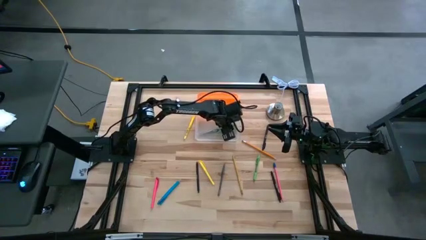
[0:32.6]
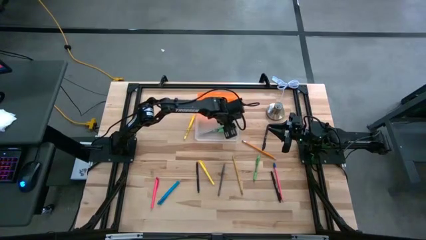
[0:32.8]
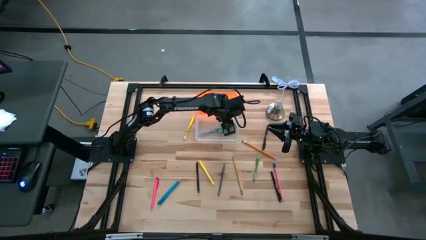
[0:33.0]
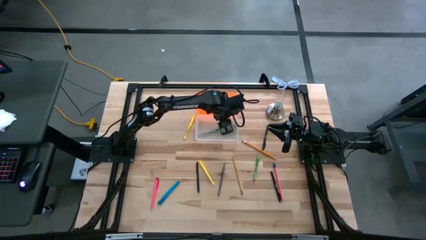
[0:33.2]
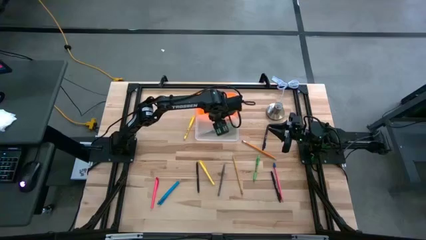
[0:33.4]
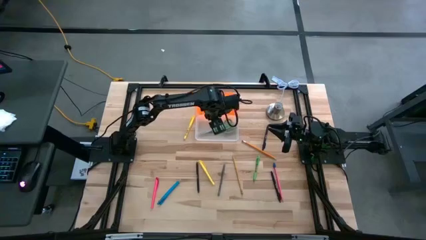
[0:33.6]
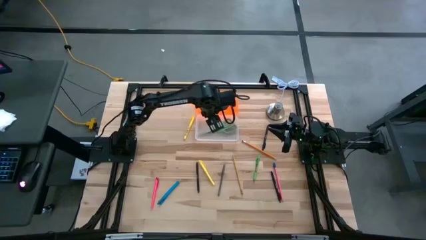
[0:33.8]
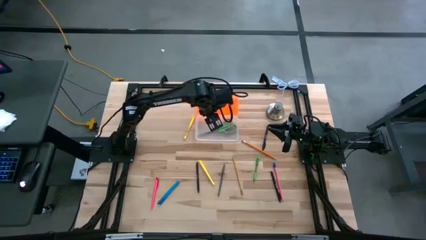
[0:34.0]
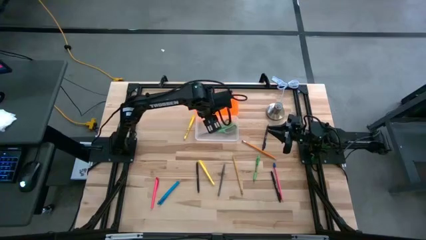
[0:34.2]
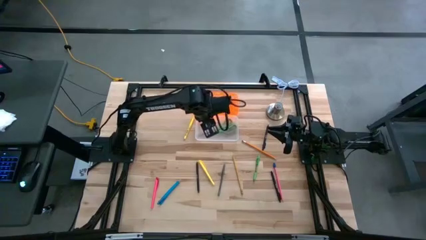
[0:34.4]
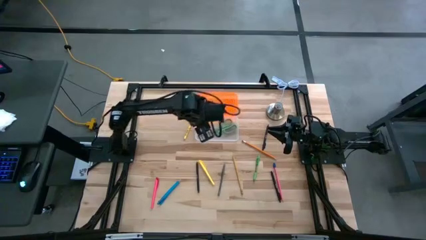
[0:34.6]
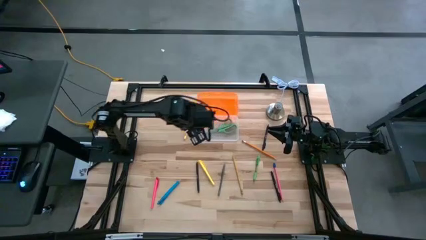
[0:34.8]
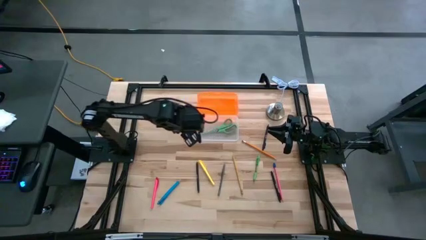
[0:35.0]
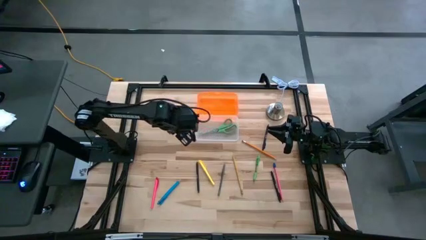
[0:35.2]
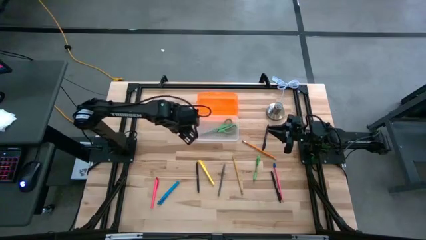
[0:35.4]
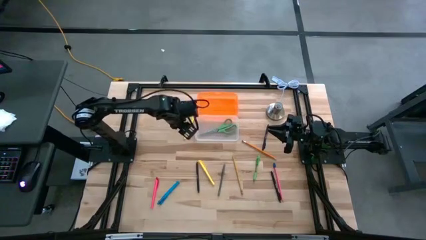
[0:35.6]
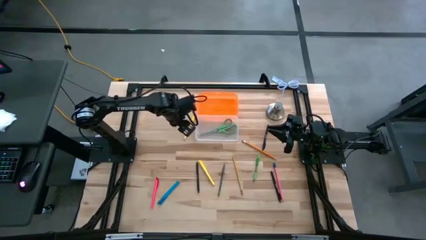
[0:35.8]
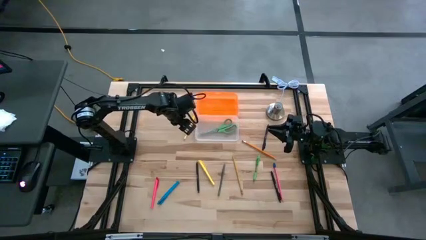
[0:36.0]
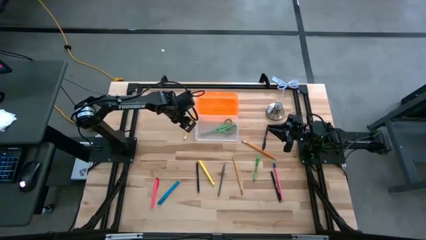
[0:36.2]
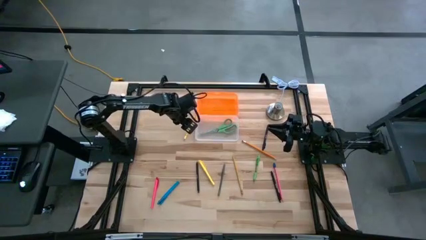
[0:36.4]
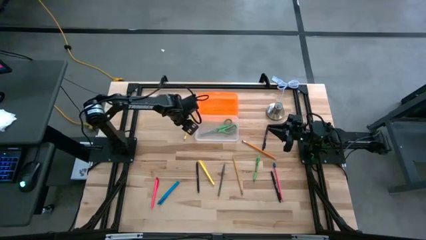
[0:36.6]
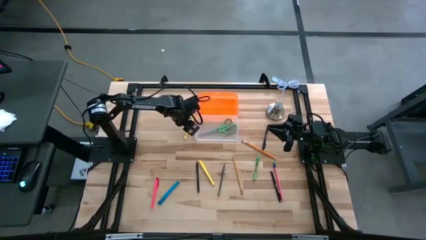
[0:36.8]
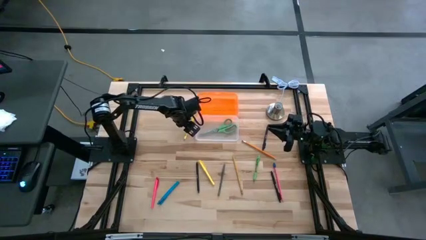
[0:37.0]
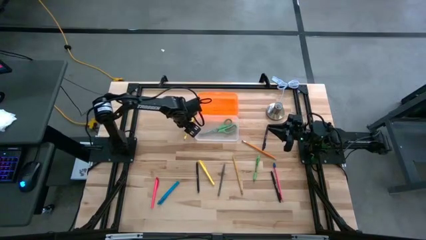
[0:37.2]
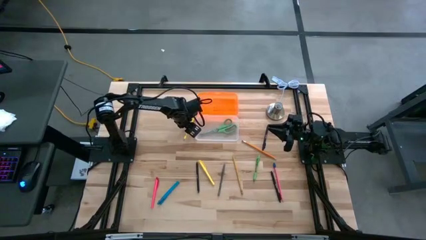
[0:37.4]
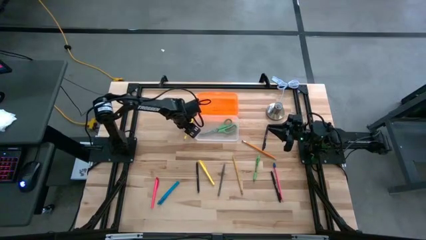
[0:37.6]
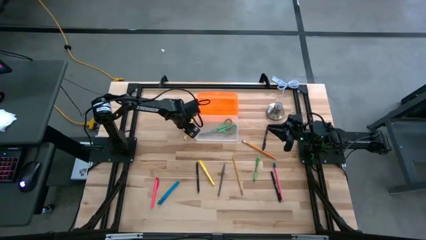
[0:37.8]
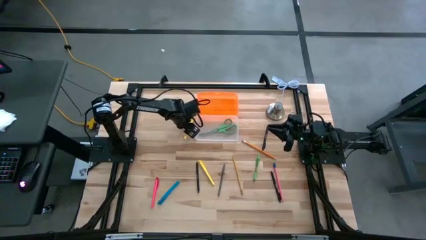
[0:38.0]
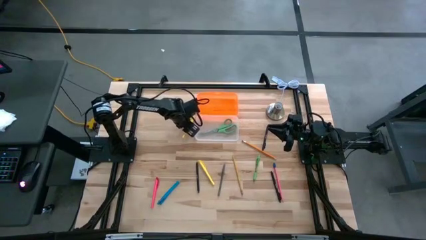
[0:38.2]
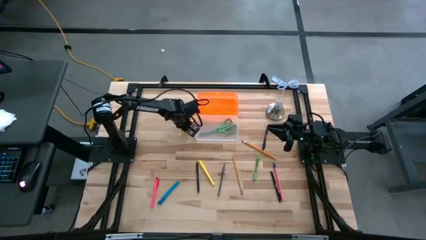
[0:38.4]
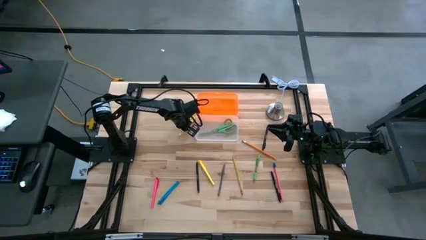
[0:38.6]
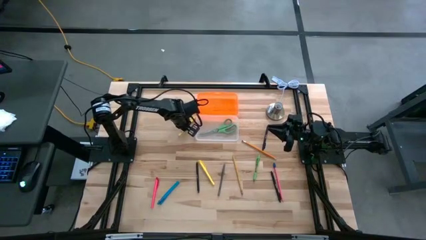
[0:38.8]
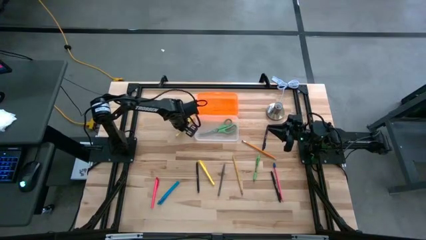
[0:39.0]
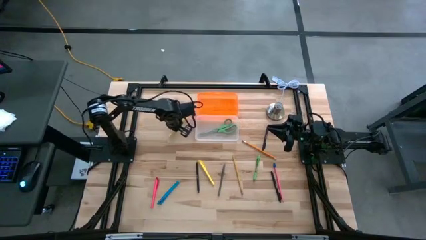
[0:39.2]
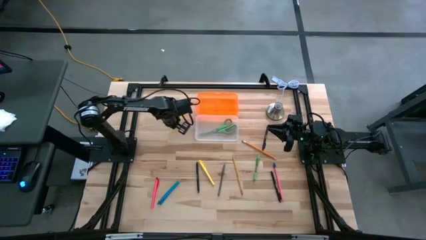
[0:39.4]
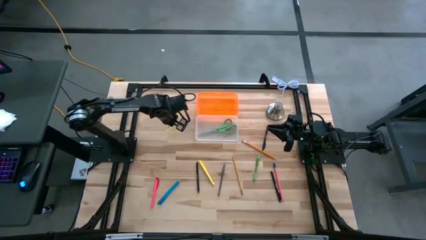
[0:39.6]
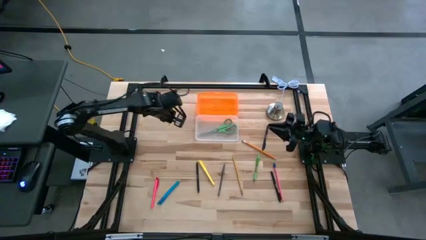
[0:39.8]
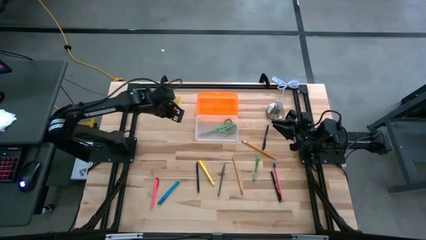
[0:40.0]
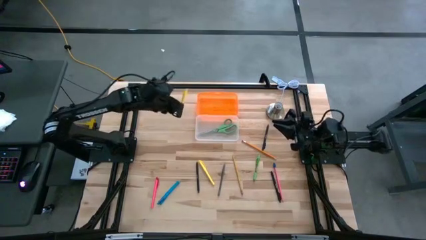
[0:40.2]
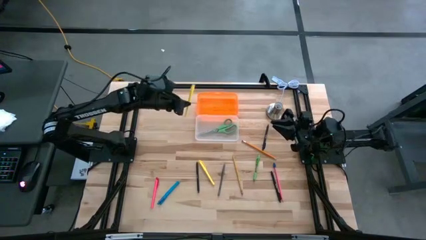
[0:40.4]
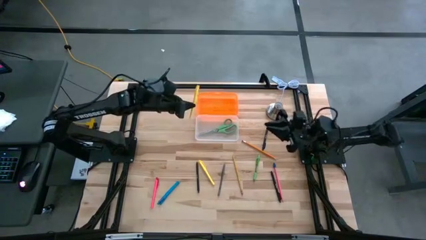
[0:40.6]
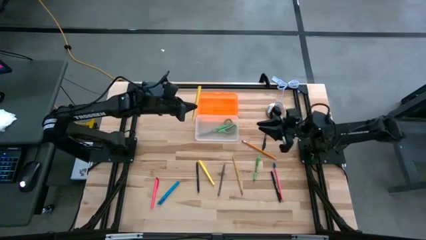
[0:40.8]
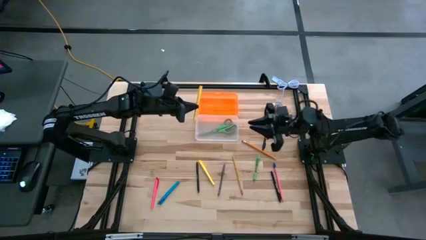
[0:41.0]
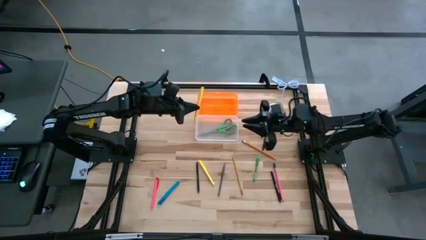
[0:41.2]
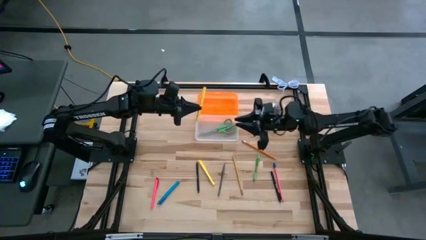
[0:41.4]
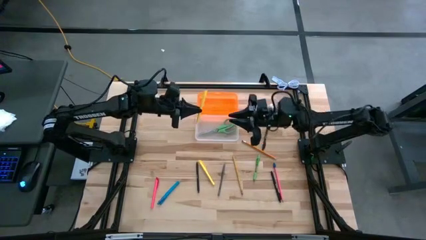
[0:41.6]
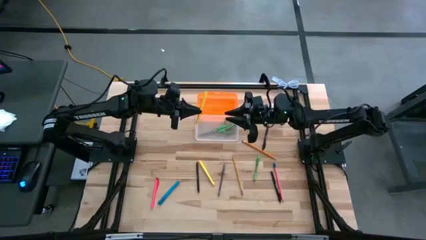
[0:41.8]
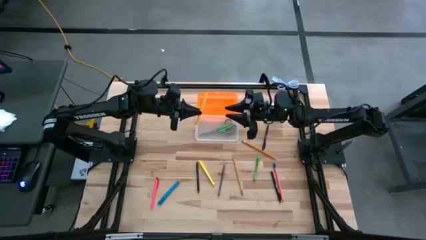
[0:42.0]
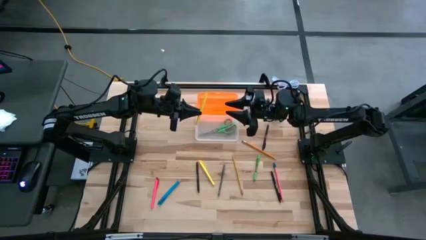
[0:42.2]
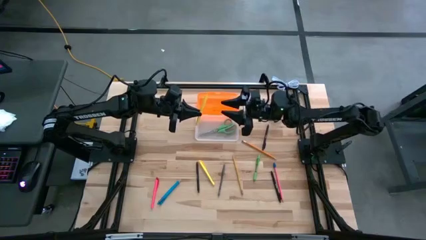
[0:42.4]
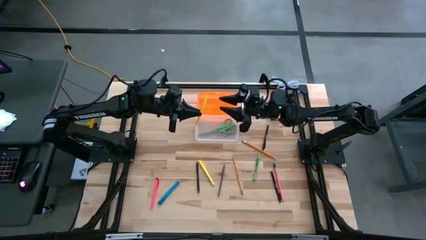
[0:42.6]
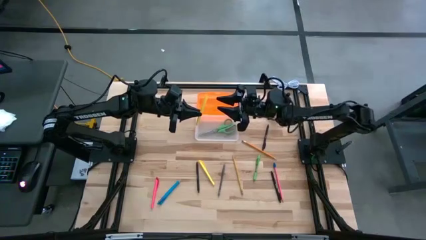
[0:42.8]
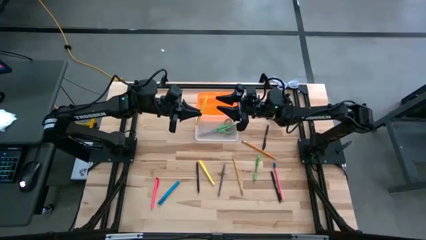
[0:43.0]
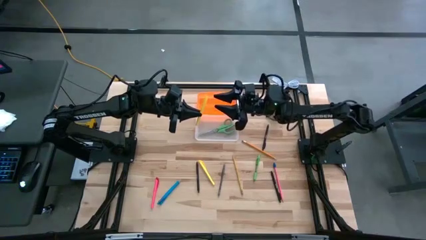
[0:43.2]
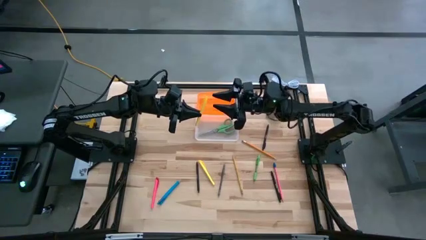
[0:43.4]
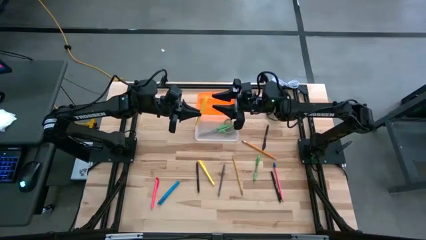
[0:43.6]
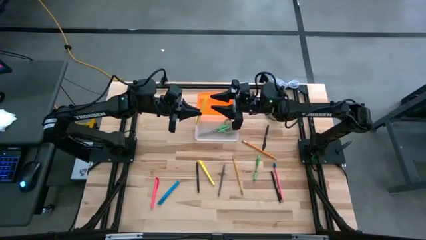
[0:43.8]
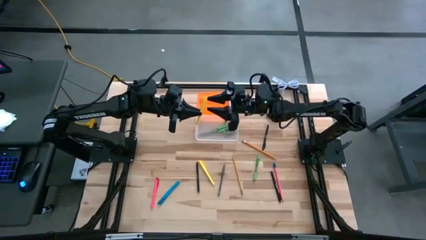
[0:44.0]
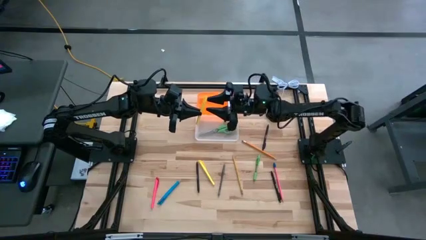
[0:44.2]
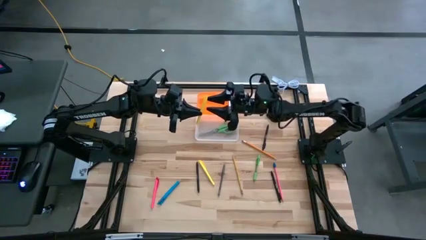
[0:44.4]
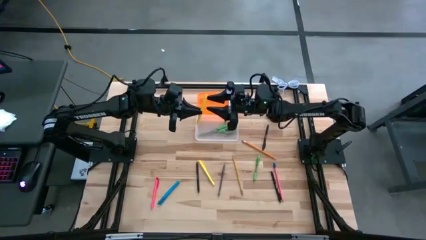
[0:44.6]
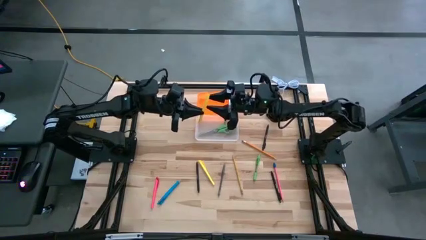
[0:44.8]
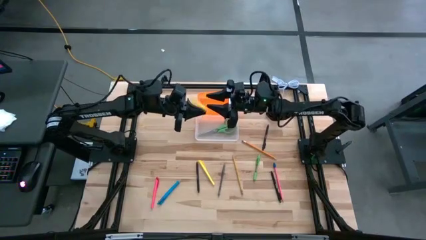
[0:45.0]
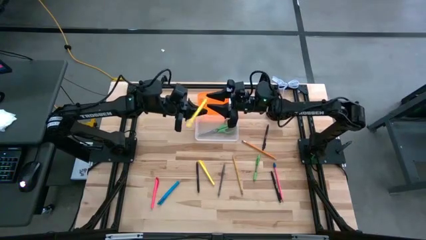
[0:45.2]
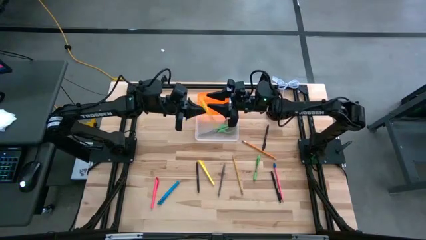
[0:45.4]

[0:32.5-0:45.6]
Task: Pick & place school supplies into a supply box
Put the top yellow pen into the orange supply box

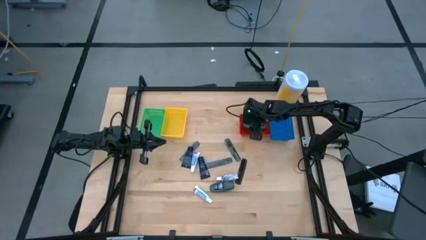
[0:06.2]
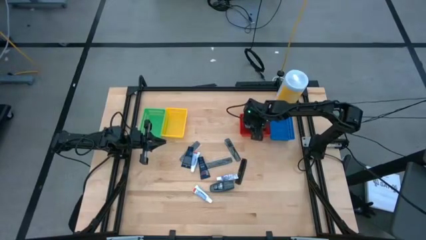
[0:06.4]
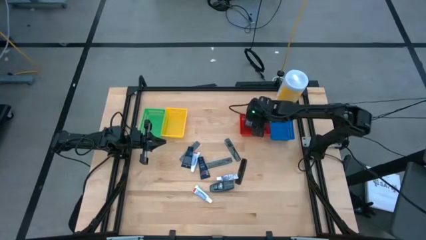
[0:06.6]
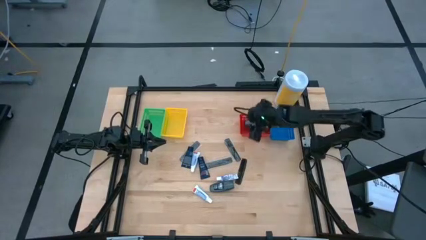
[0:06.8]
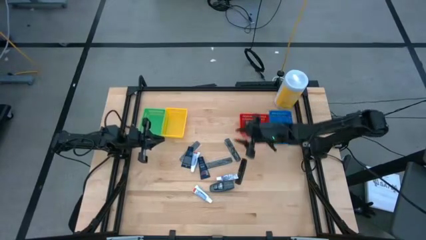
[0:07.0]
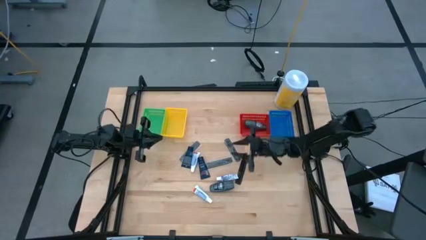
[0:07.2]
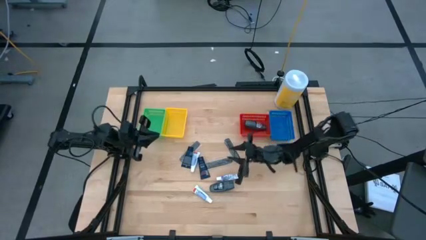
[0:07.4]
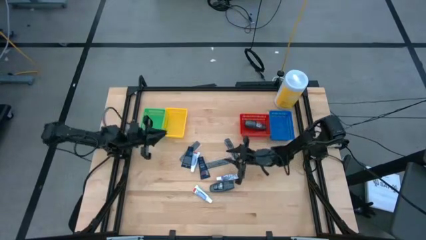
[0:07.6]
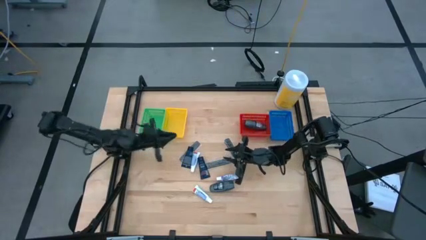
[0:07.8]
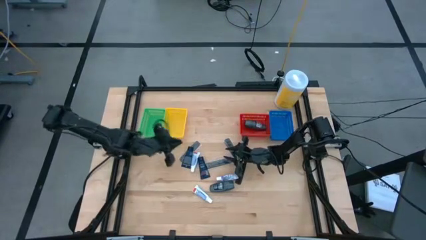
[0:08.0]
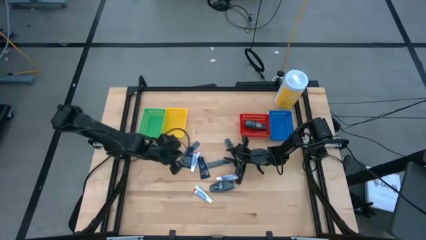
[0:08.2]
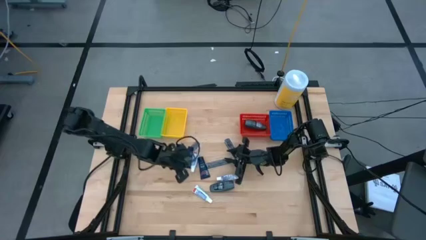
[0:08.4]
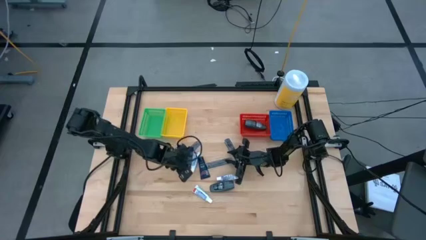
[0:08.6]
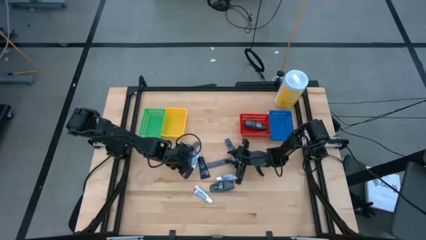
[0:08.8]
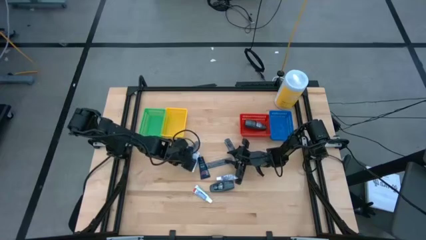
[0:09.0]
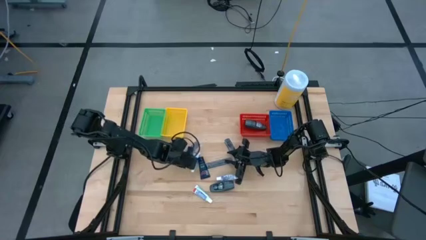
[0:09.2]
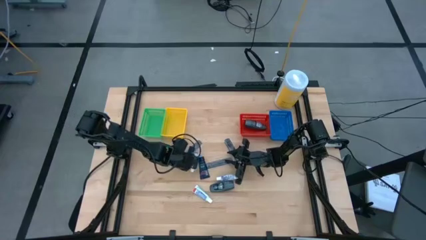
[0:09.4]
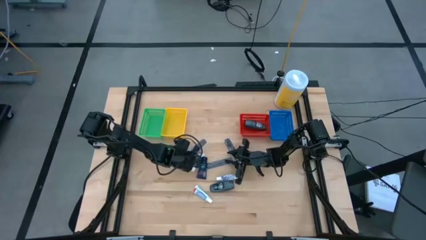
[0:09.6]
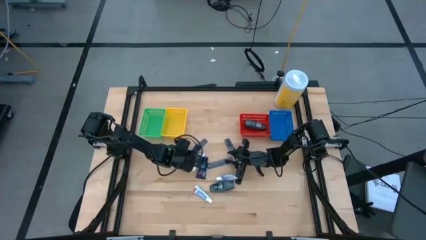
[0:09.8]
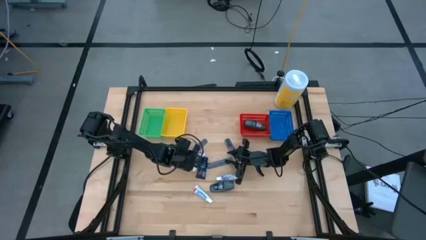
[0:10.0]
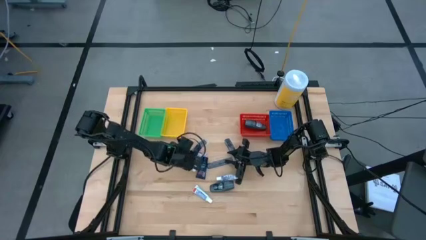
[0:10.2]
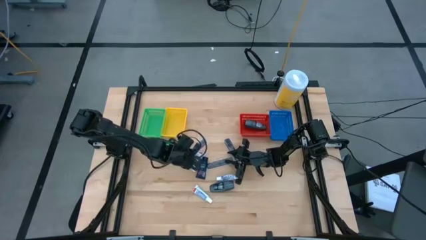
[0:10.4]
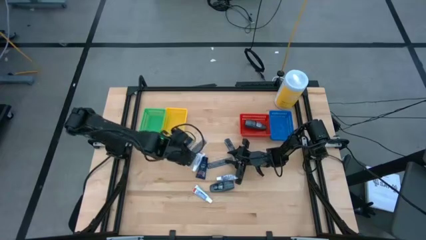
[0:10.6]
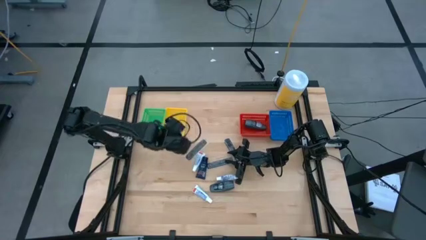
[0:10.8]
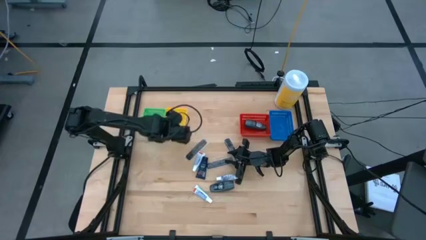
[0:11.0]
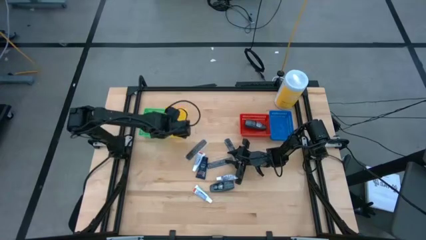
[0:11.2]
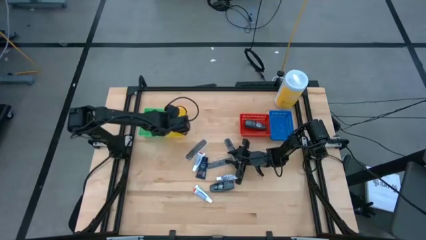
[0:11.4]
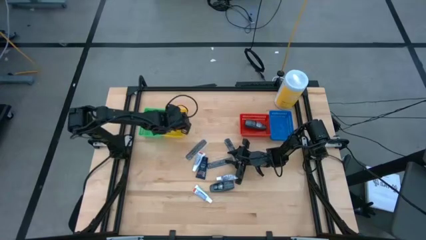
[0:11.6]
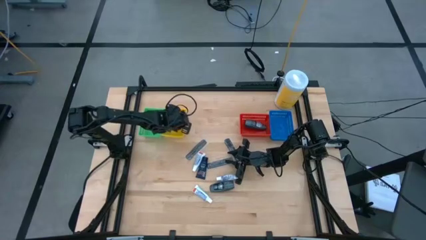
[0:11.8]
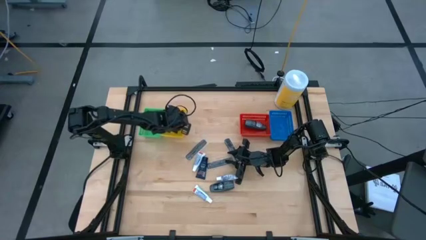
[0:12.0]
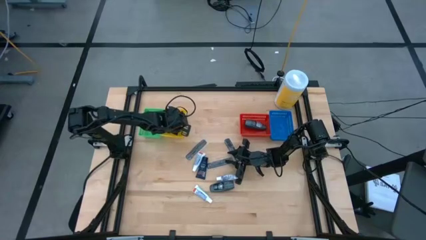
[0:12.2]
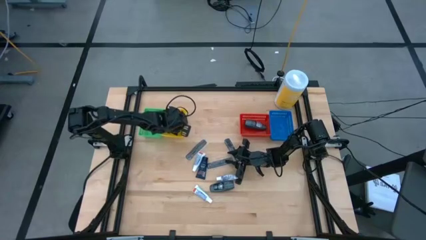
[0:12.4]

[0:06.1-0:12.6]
Task: Pick & Place Travel size toiletries
Put the shave cream into the yellow bin
